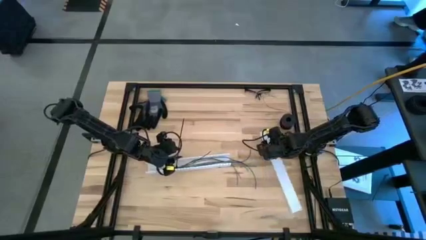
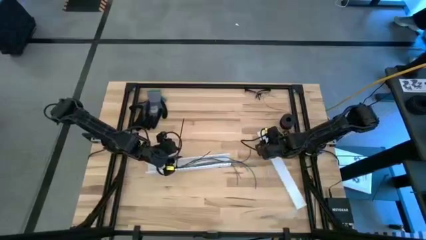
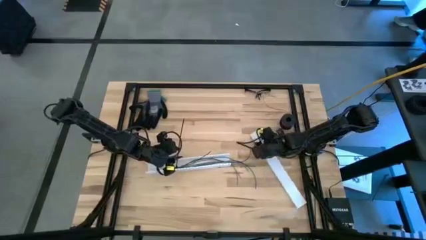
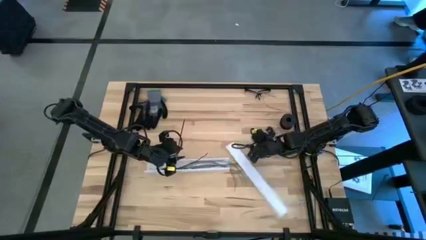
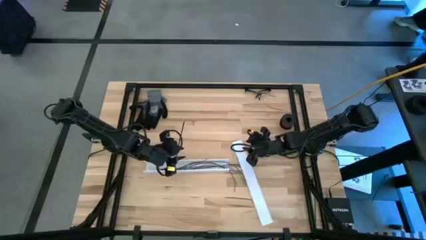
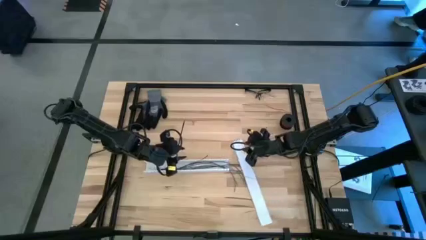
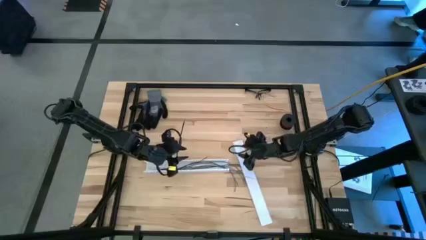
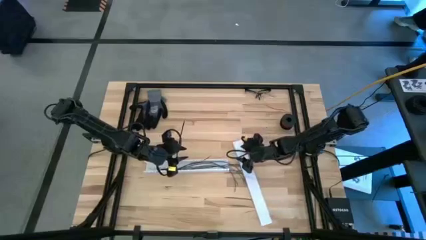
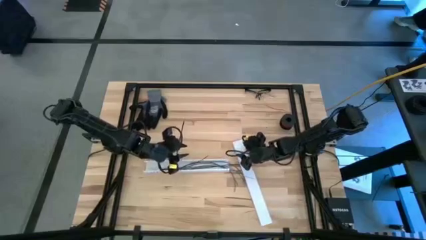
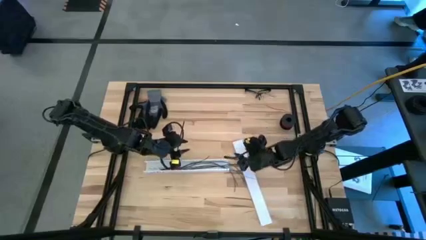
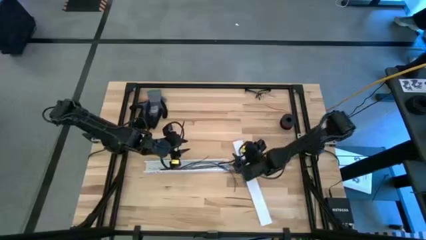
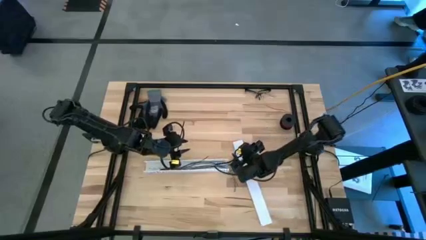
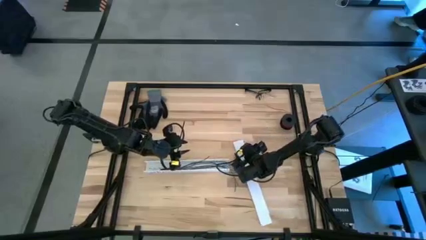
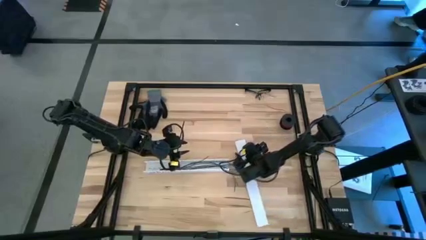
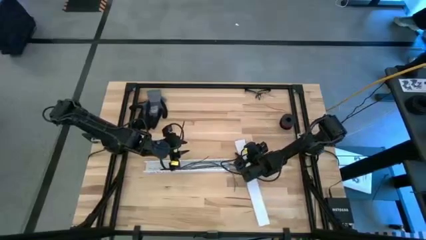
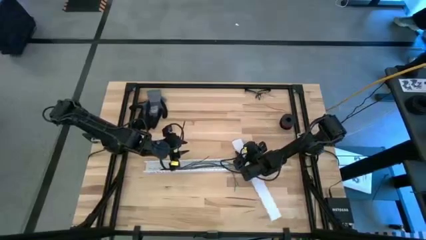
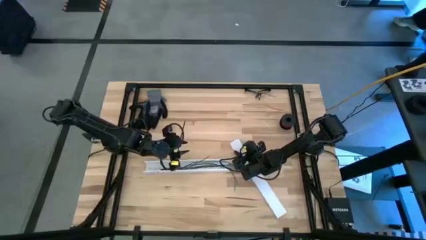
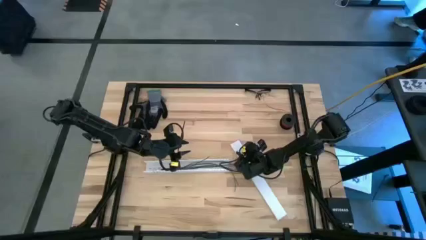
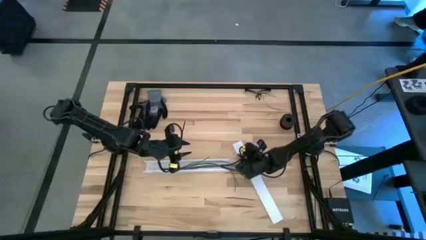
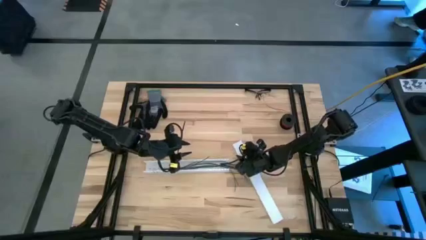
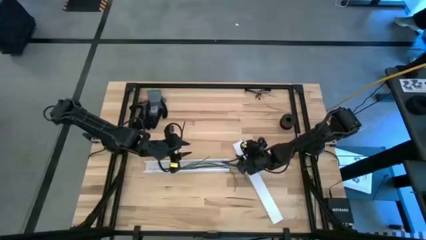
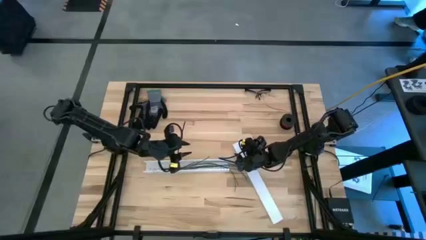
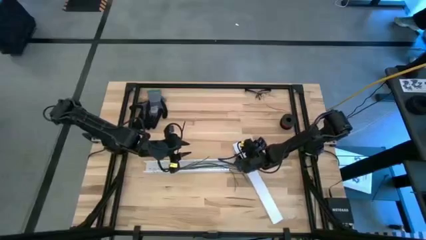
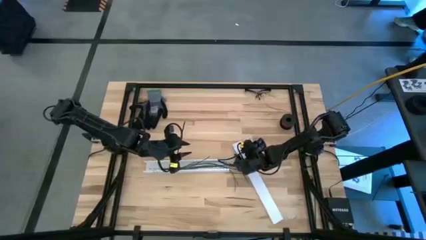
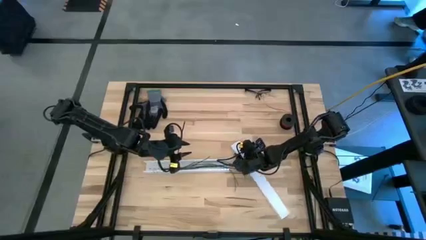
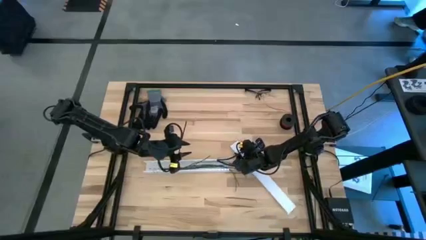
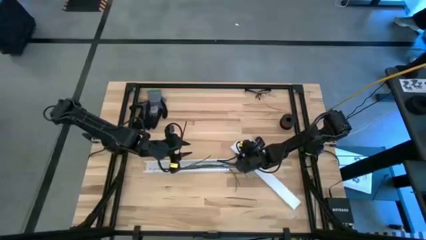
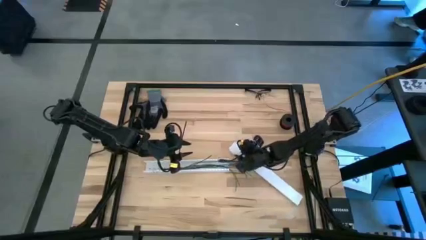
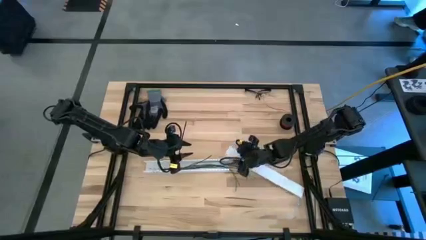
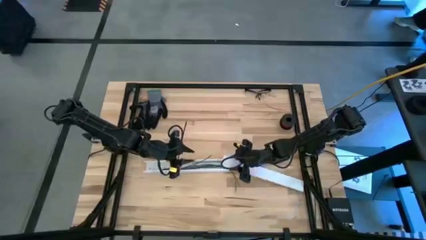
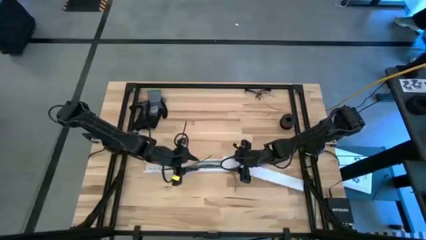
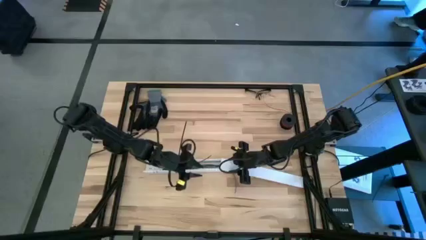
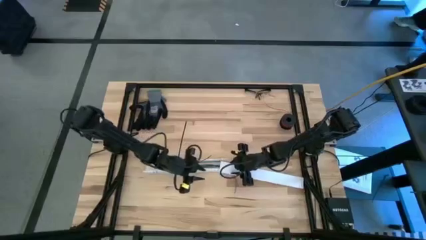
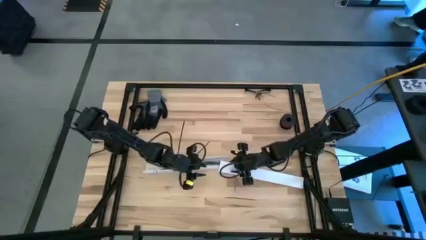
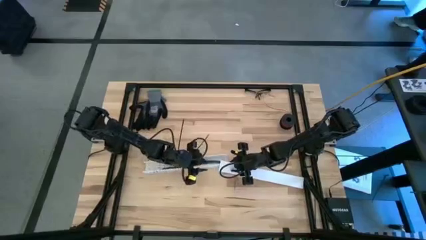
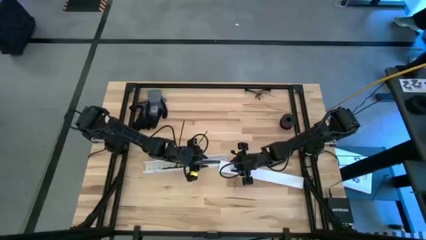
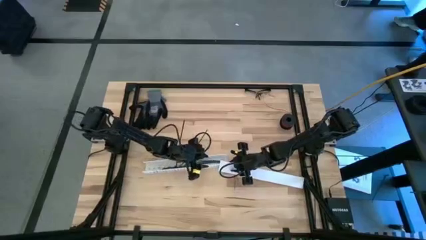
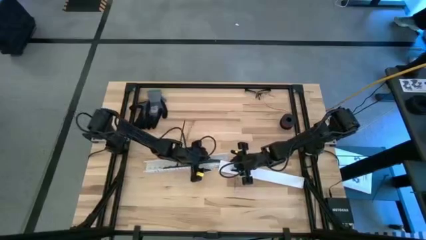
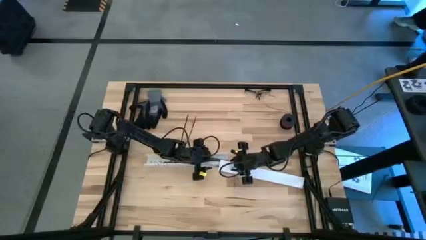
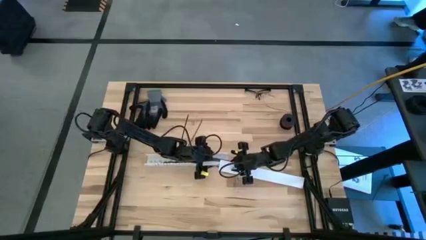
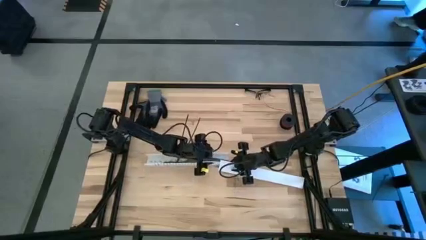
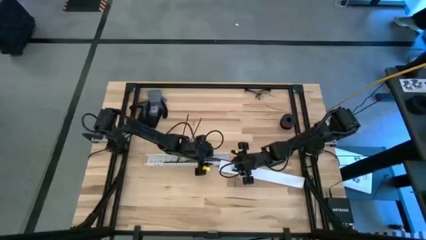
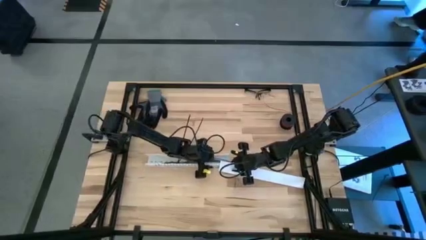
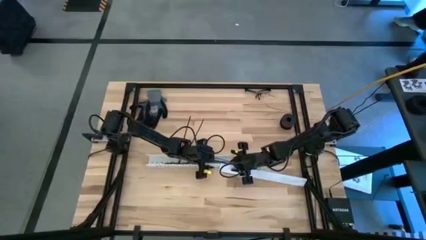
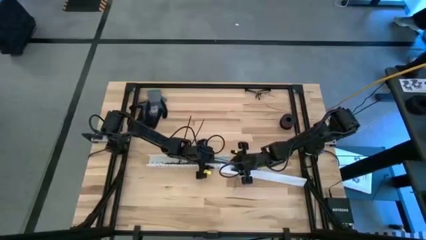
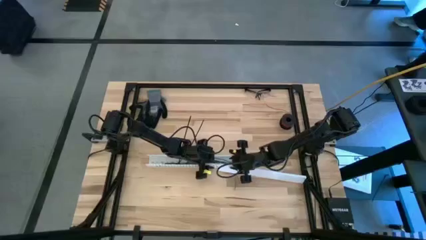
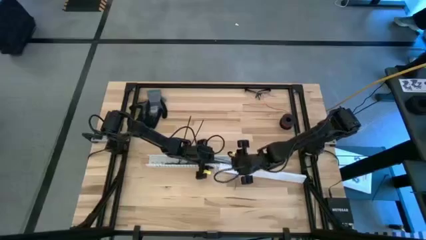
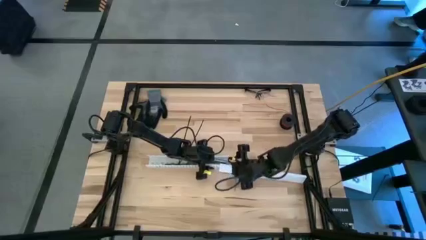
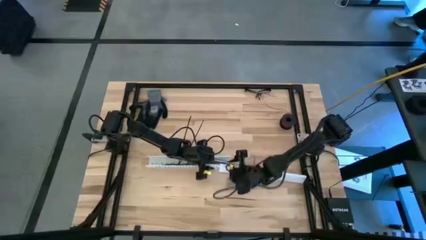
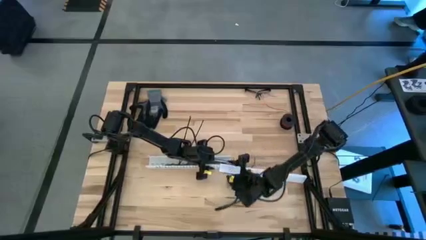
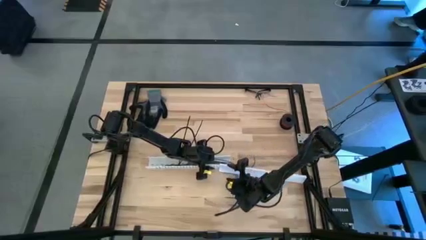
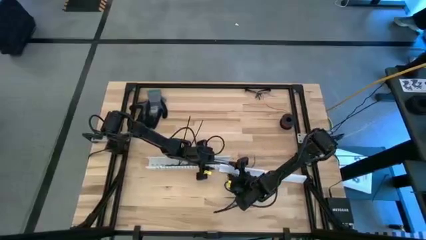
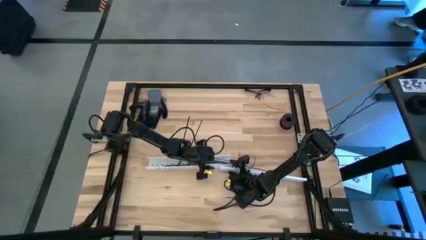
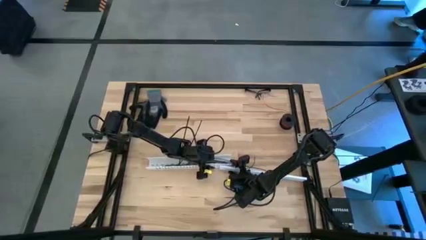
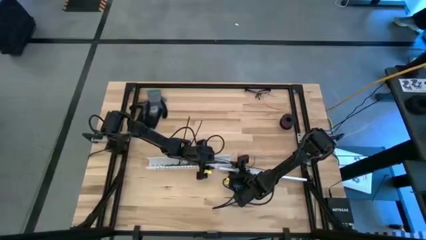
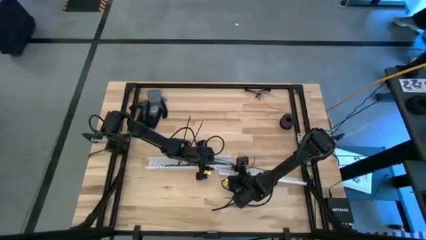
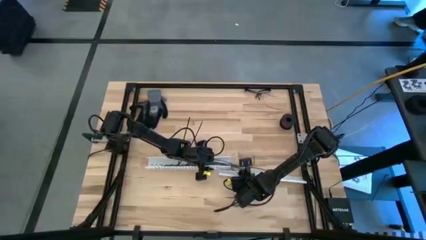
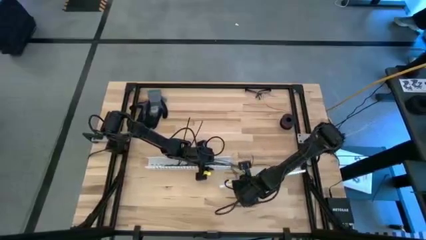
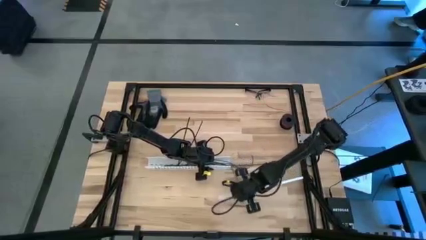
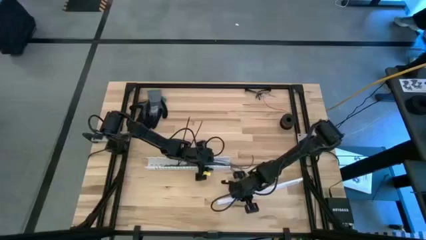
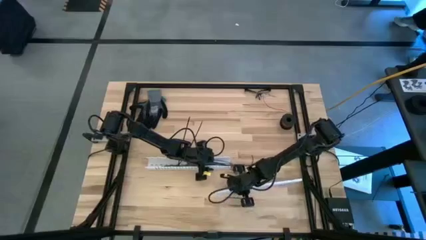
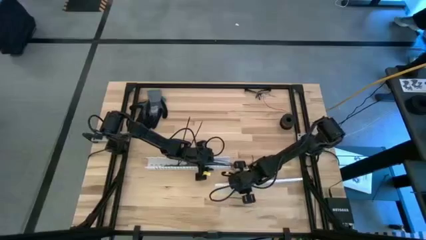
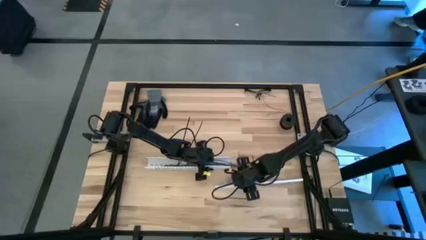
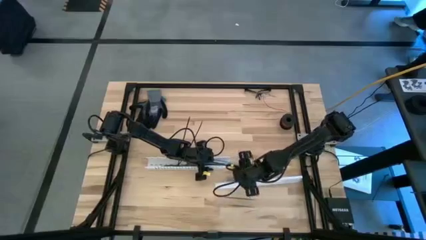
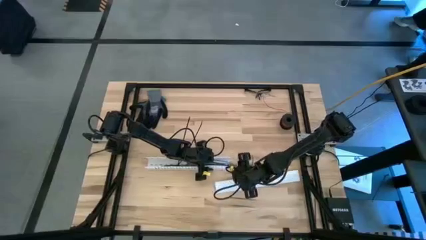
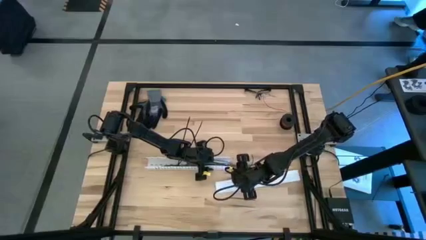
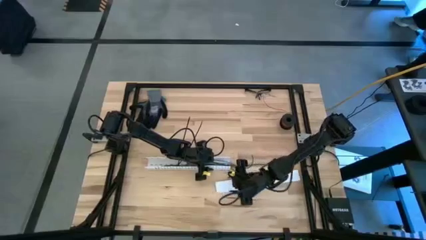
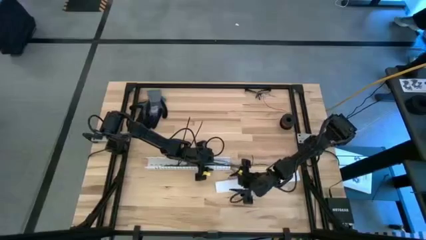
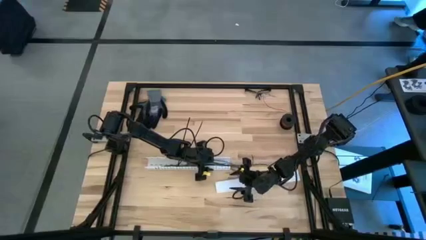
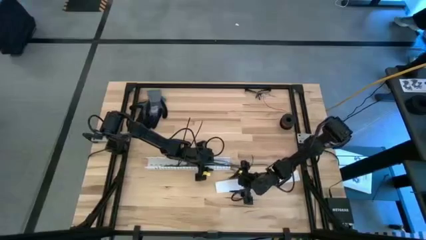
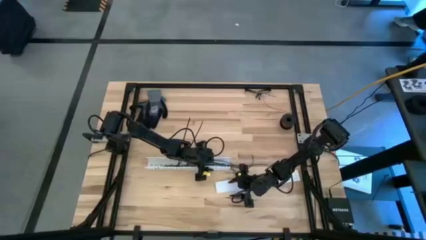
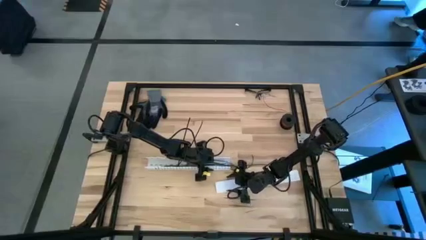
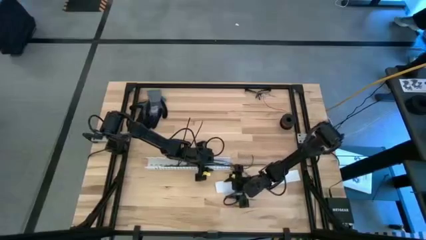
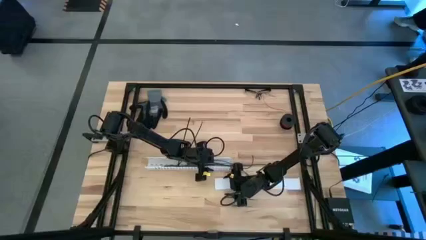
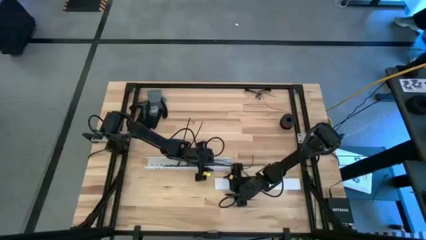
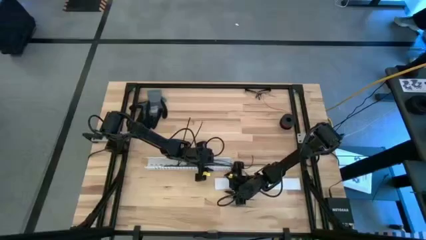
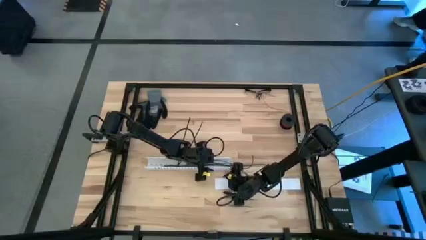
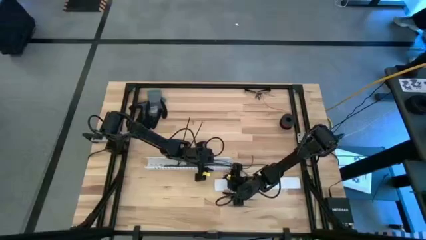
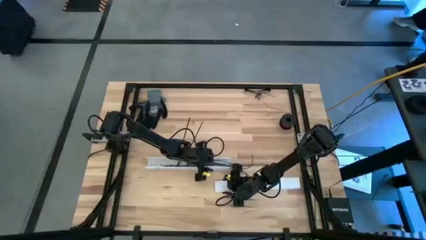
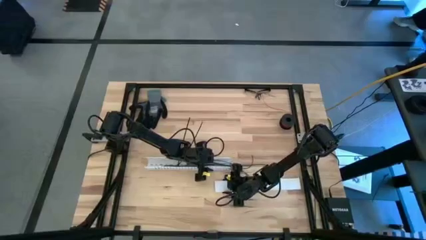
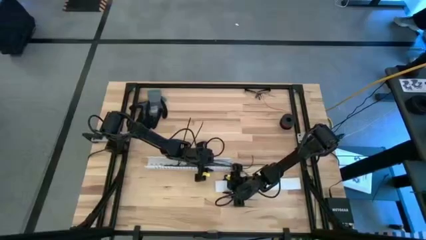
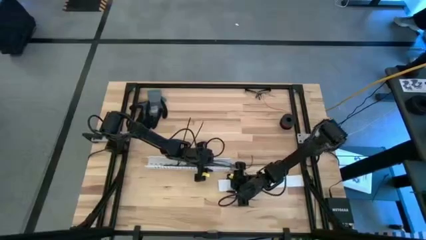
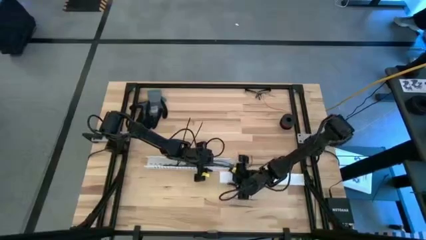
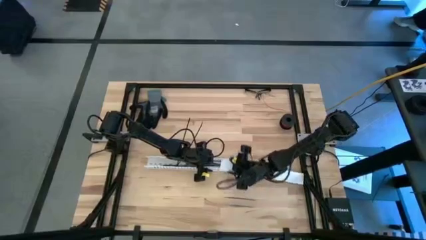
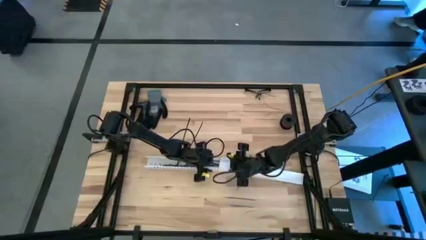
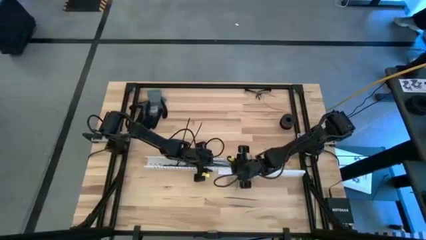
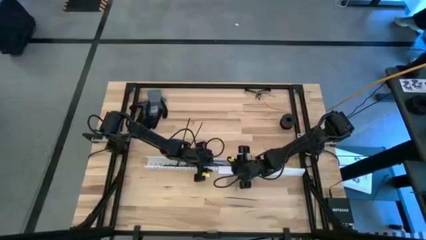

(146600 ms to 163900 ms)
Task: Ziptie cables
Close the white cable duct

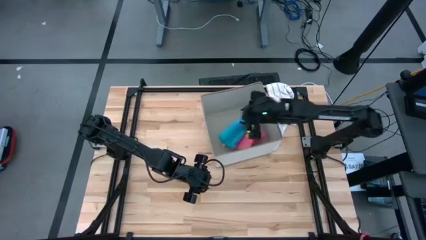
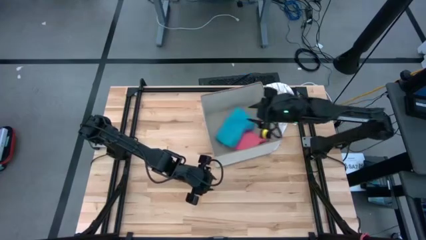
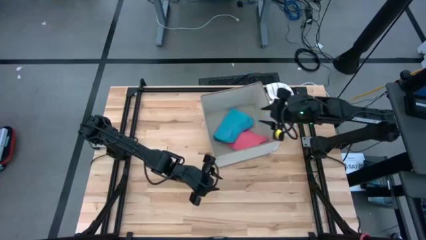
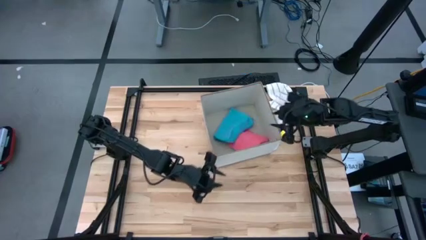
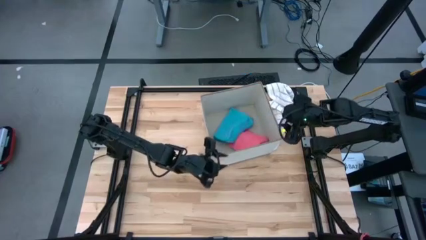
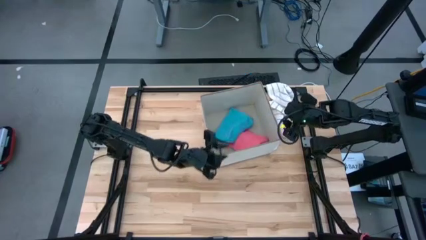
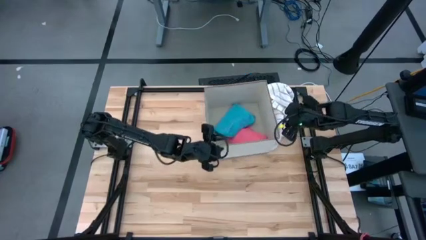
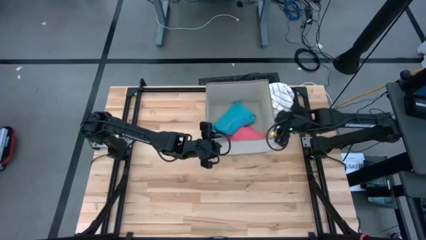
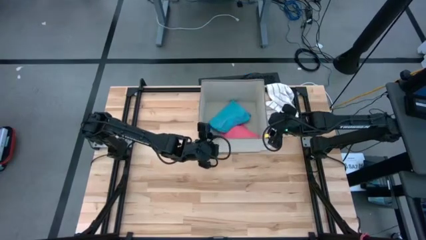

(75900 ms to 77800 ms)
Task: Fold towel
Adjust the laundry organizer
